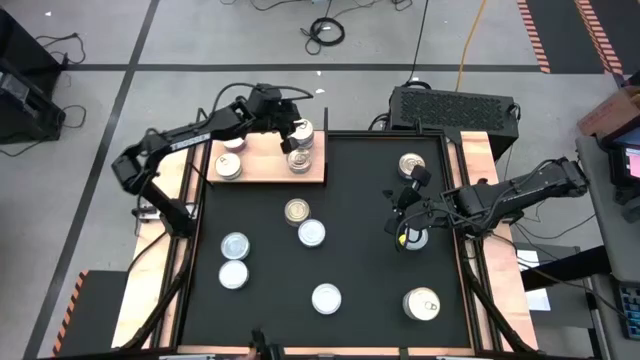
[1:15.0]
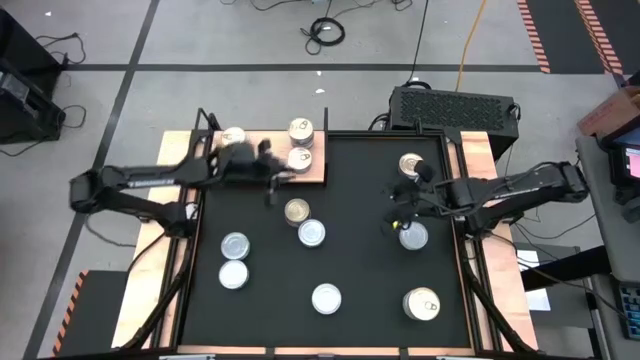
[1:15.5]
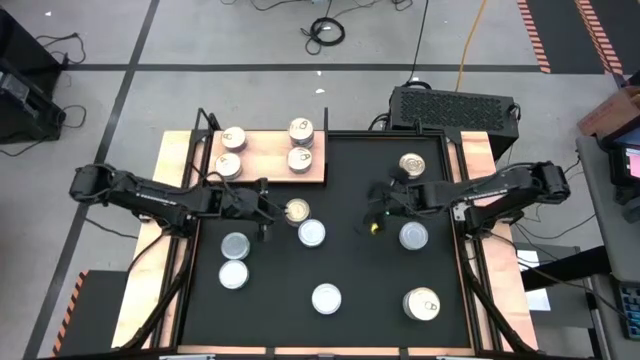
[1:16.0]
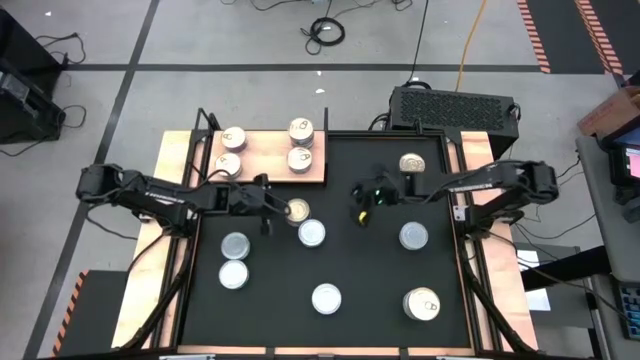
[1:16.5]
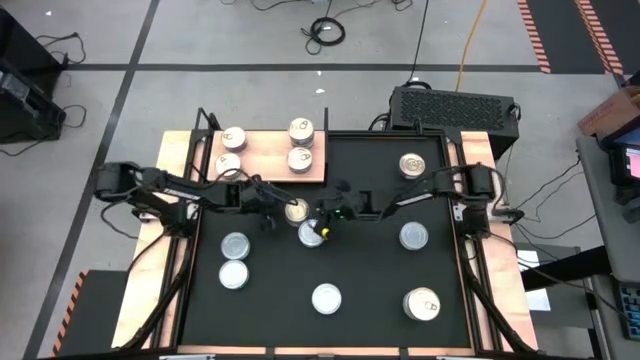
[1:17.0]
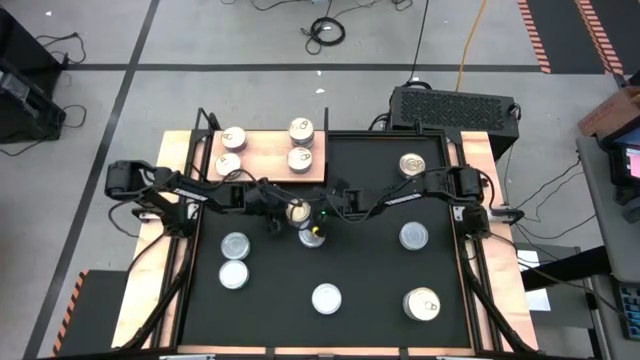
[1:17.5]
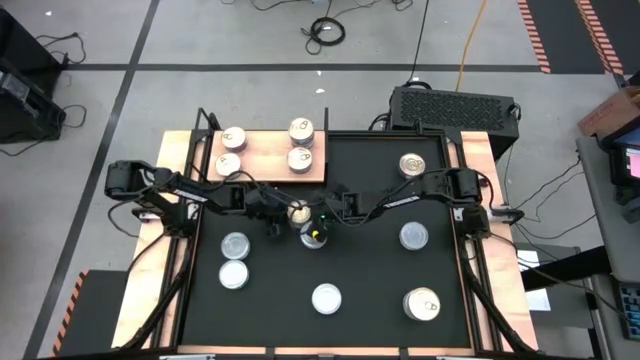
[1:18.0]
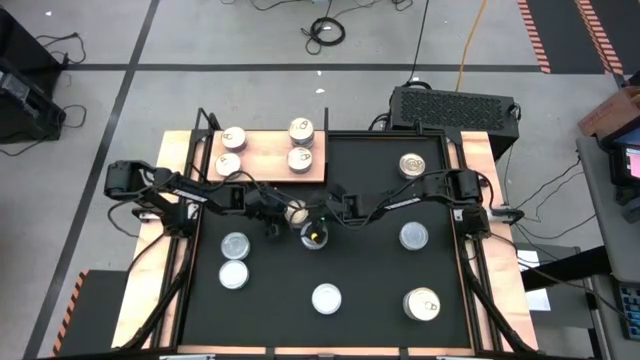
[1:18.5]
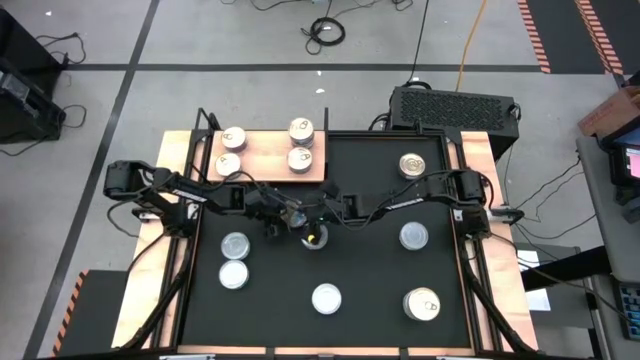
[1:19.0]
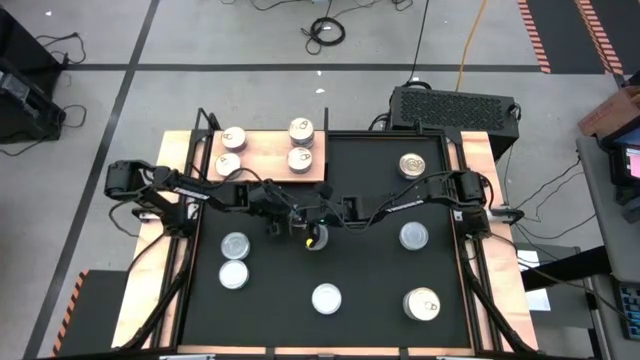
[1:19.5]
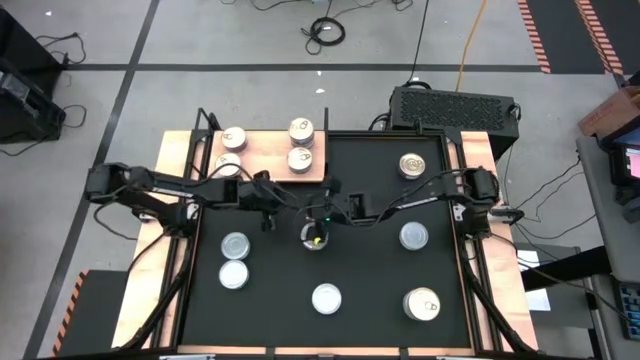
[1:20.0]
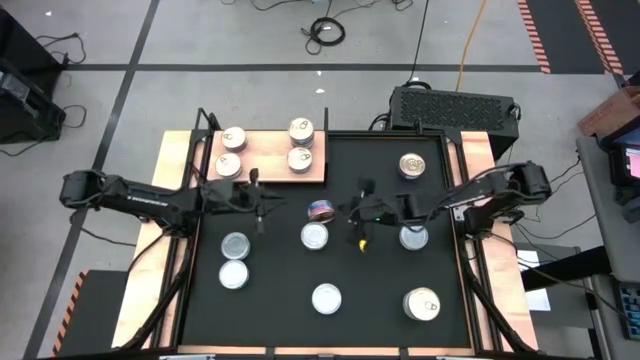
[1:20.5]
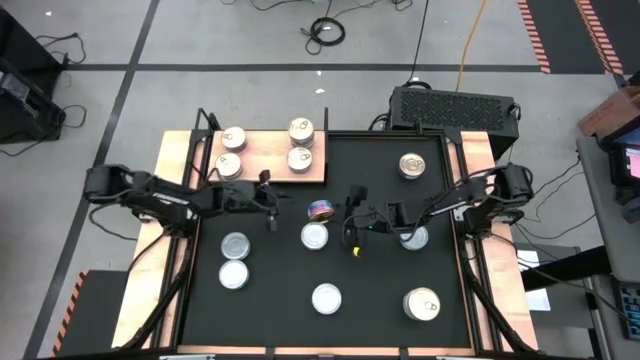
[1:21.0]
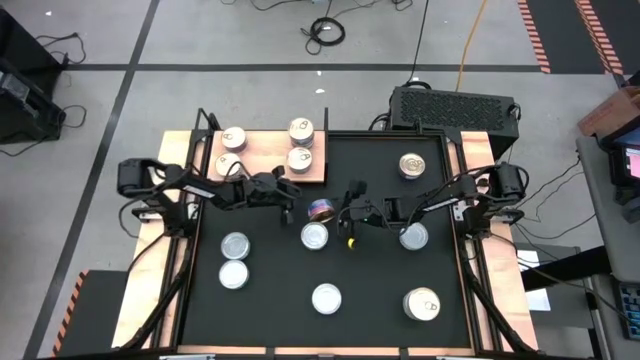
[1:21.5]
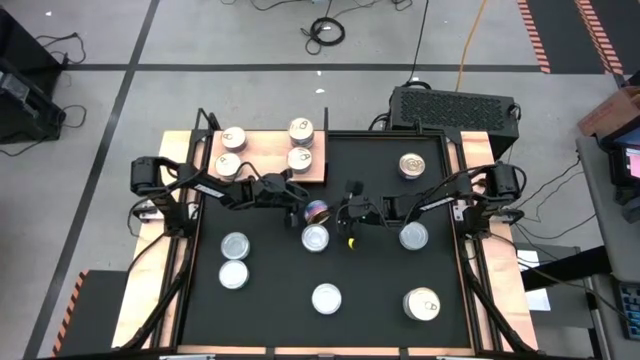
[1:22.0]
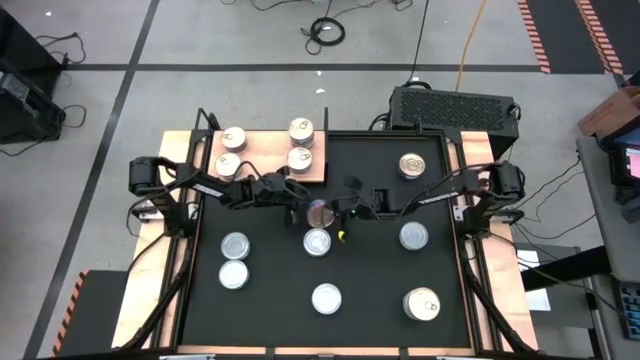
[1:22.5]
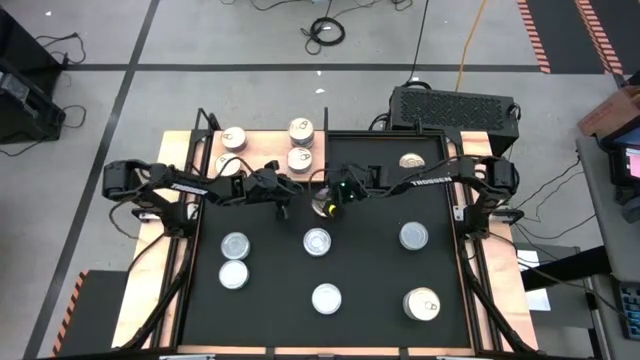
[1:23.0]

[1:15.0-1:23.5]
Task: Stack canned seafood by type on shelf
Stack the blue-pink tuna can on top of the other blue-pink tuna cans on the shelf

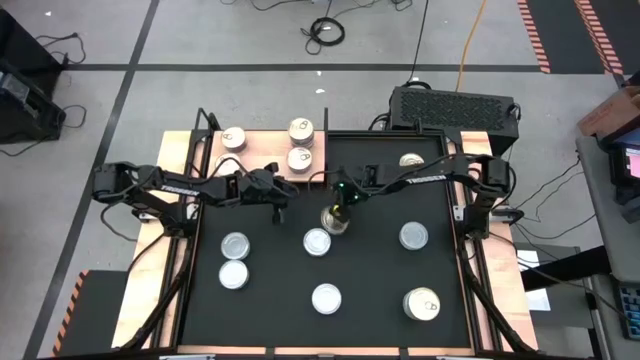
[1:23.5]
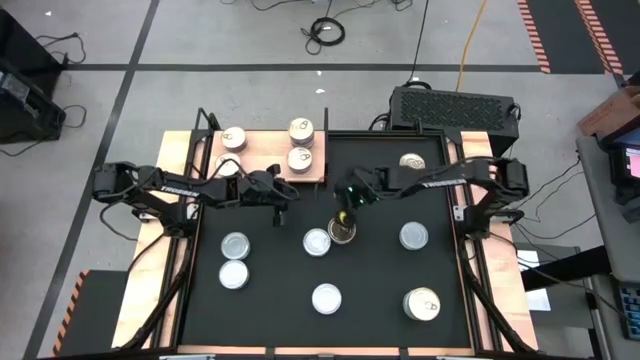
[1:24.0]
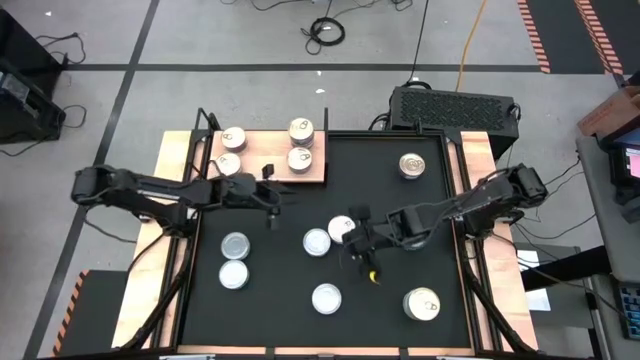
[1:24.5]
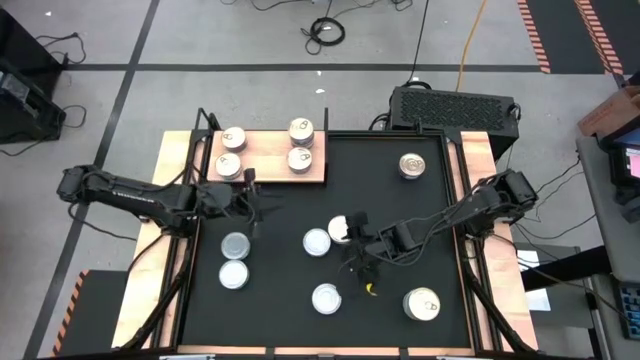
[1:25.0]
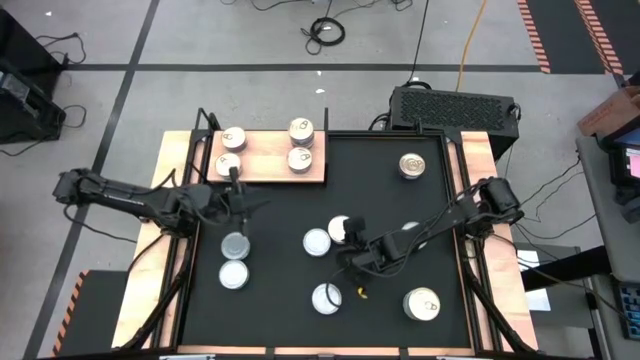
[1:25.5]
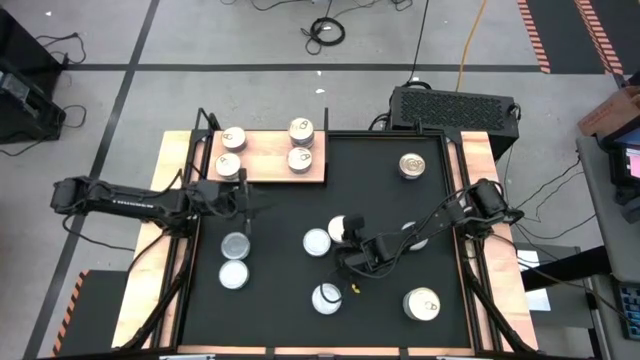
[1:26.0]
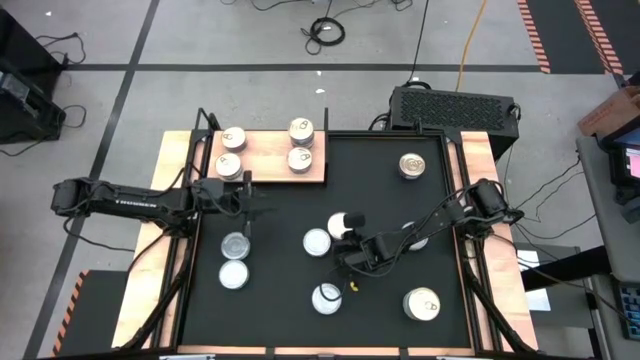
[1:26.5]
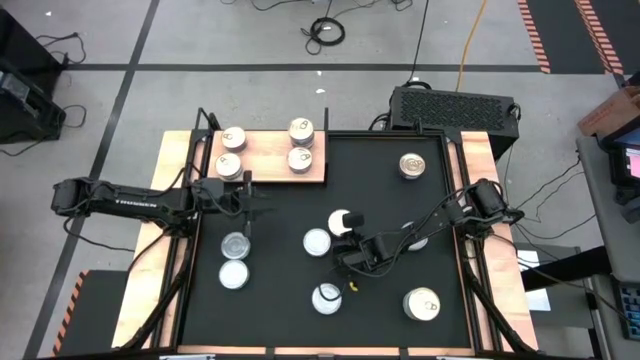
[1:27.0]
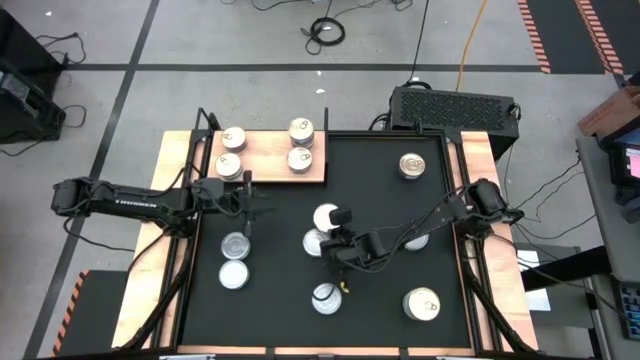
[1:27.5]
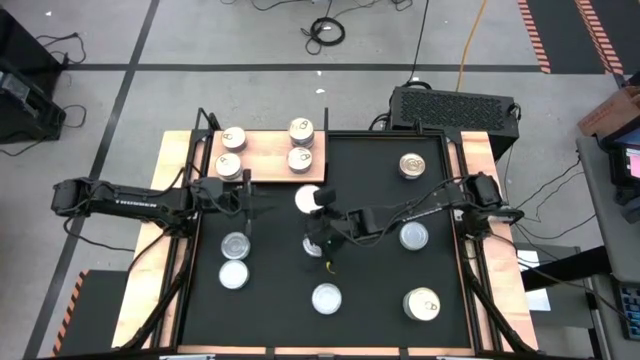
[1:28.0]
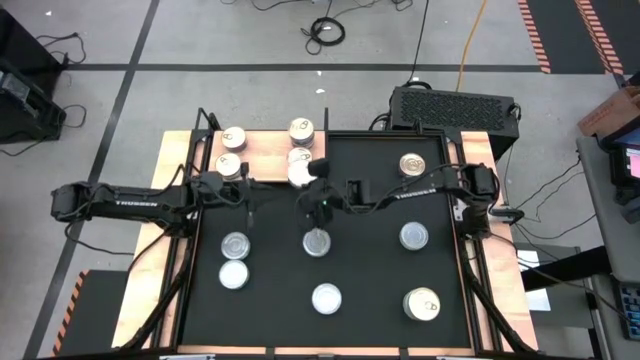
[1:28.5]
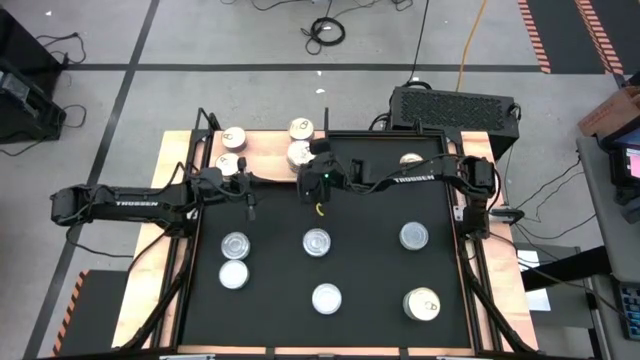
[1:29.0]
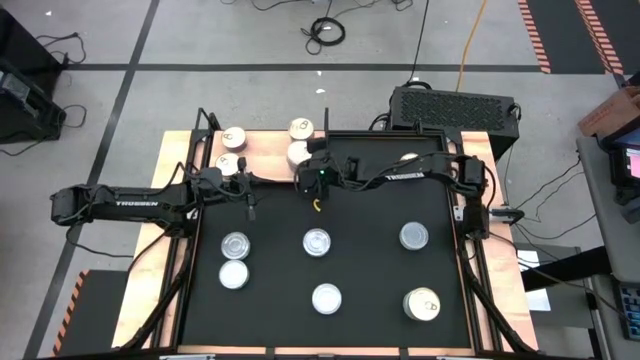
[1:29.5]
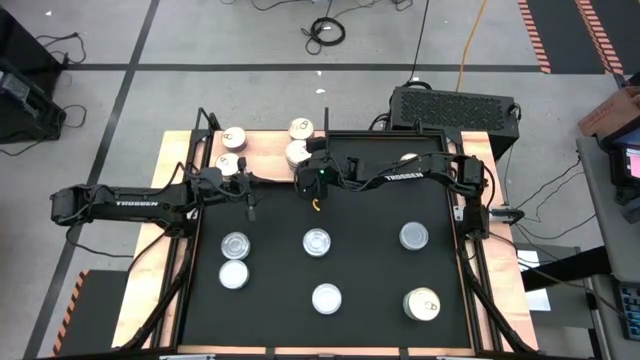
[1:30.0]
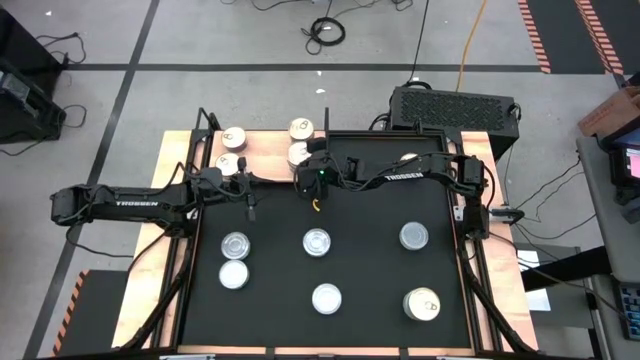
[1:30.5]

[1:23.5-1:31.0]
Stack the blue-pink tuna can on top of the other blue-pink tuna cans on the shelf

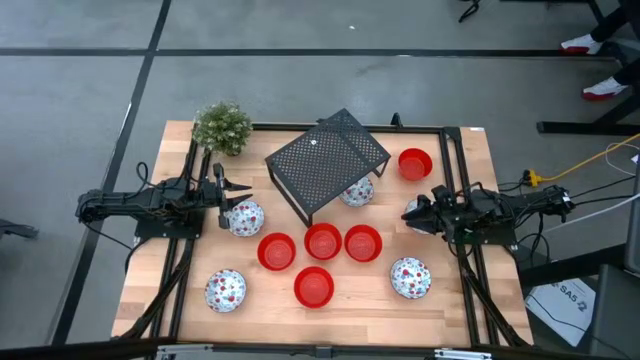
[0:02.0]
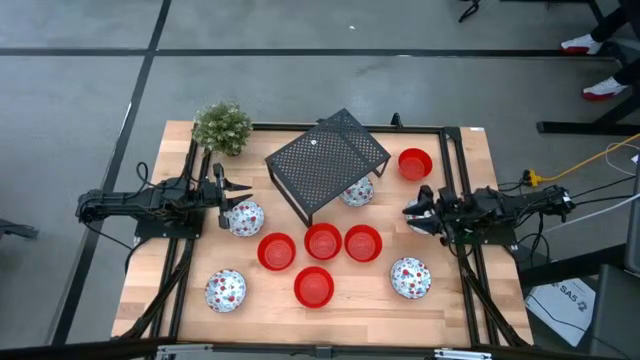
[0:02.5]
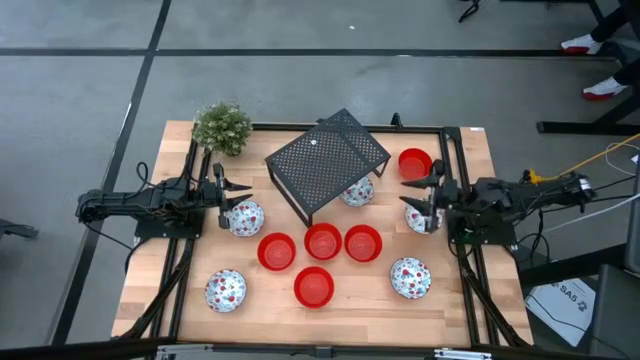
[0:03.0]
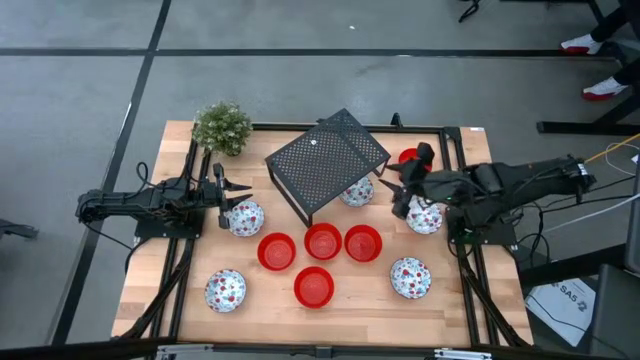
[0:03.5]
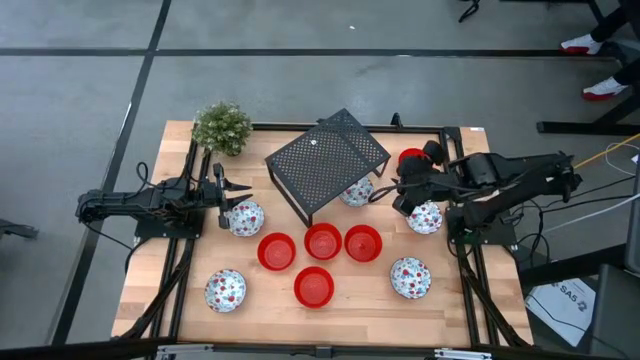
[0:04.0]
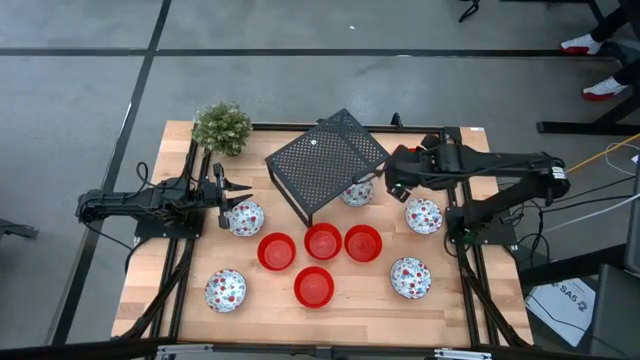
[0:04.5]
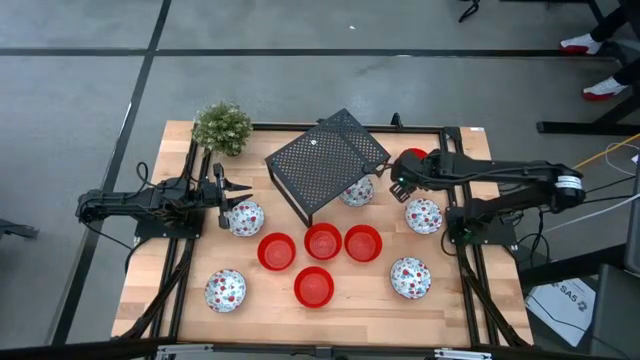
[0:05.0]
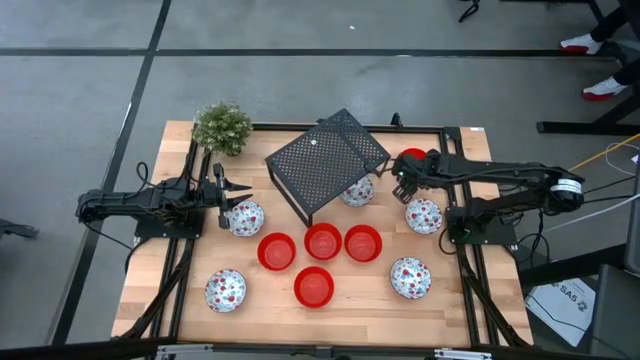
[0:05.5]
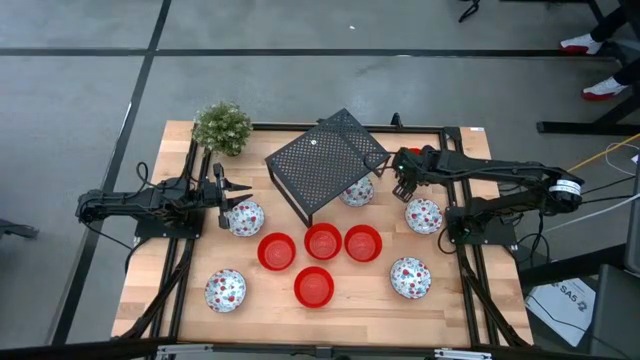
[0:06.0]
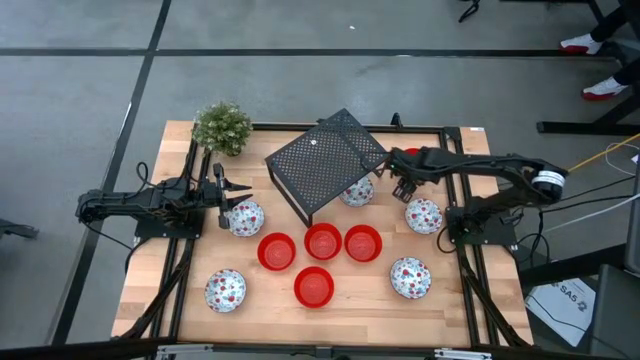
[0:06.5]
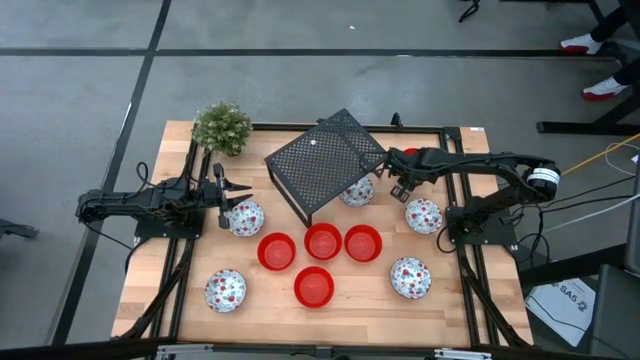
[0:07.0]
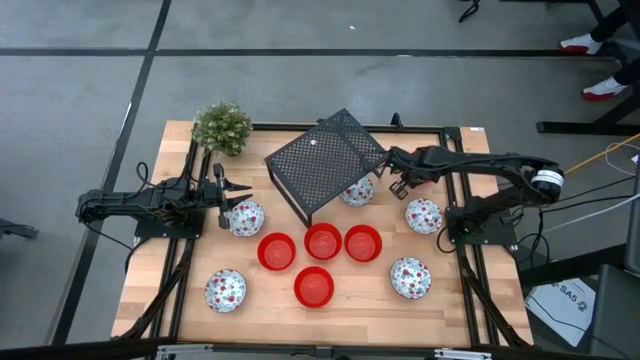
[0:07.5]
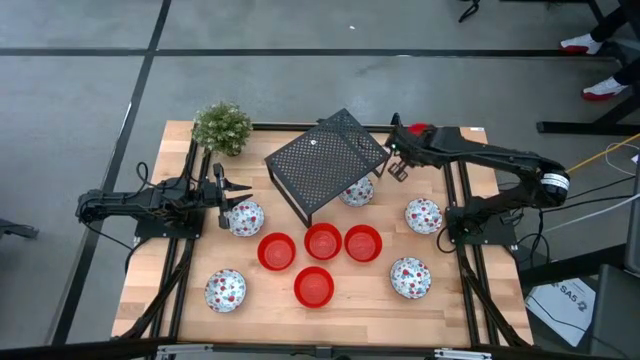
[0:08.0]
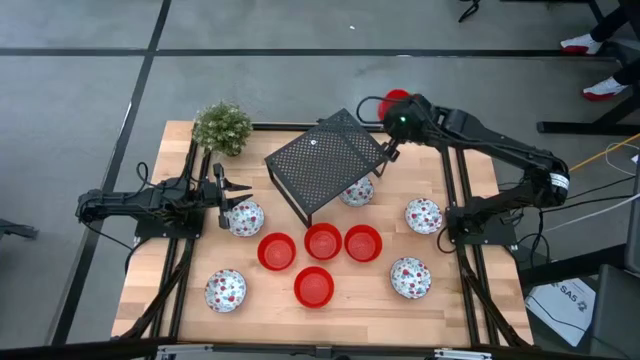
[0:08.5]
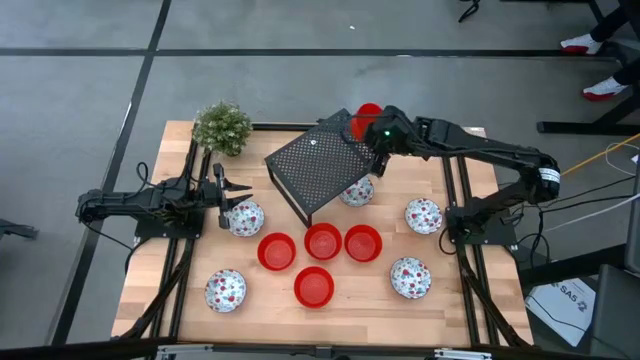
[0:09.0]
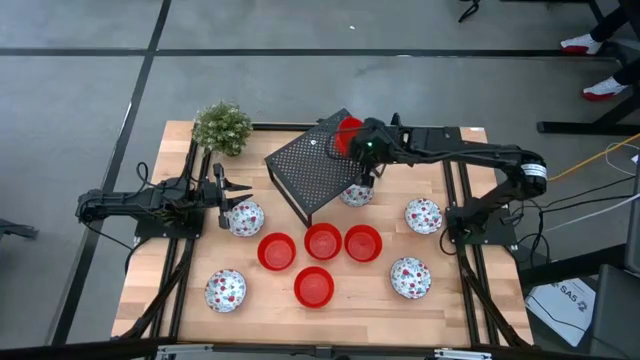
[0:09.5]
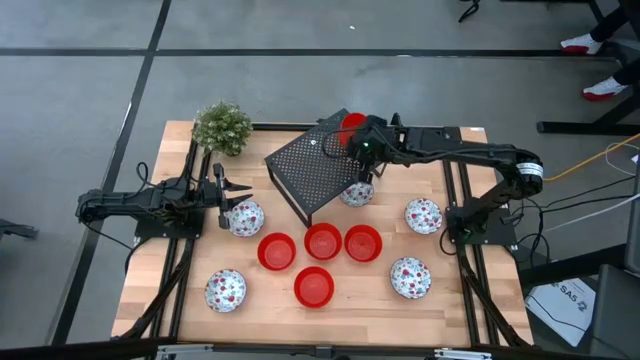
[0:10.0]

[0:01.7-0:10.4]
Task: Pick & Place Mini bowls
Put the red bowl on the shelf
